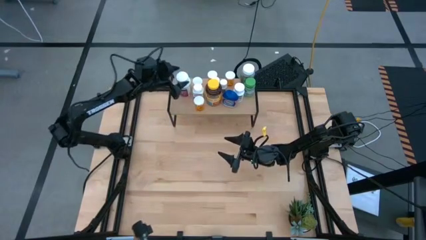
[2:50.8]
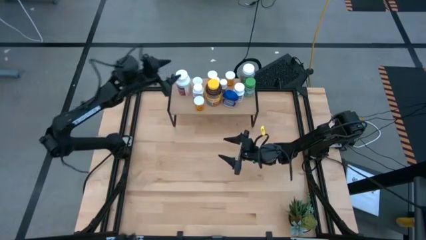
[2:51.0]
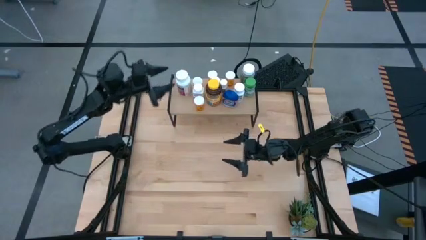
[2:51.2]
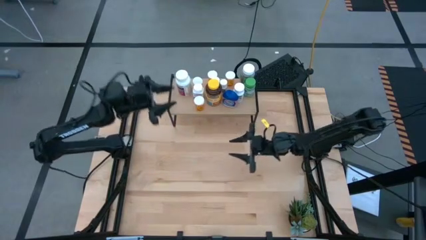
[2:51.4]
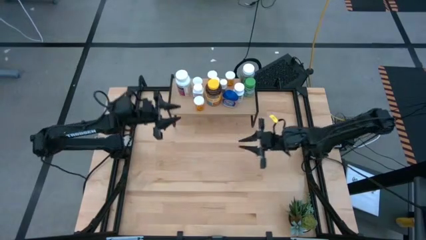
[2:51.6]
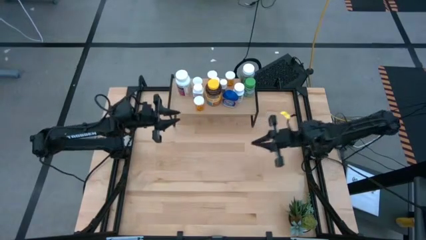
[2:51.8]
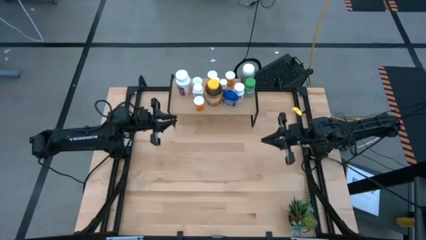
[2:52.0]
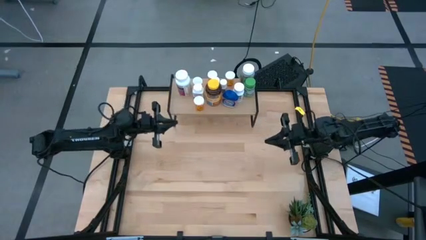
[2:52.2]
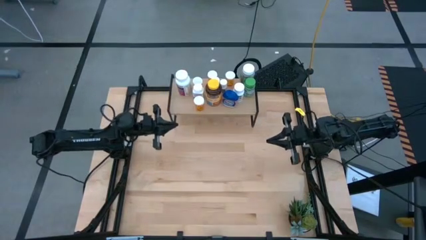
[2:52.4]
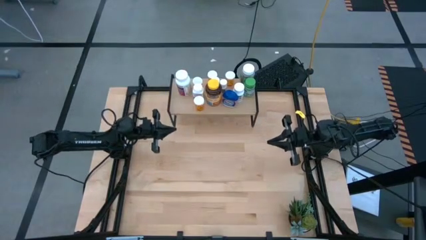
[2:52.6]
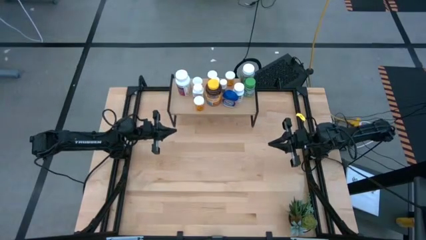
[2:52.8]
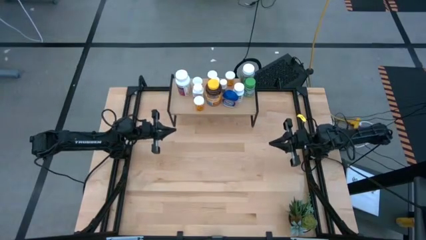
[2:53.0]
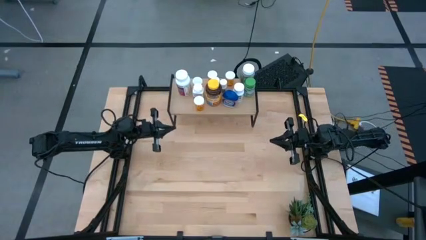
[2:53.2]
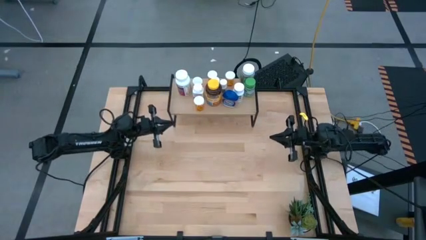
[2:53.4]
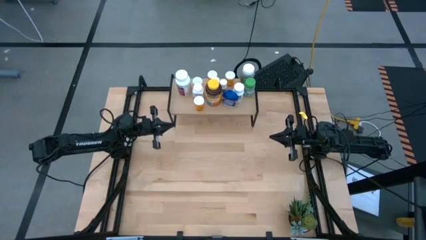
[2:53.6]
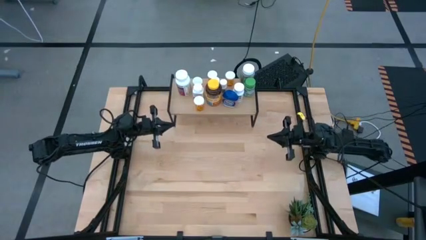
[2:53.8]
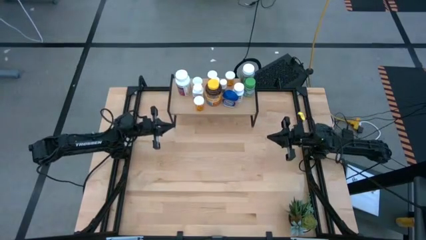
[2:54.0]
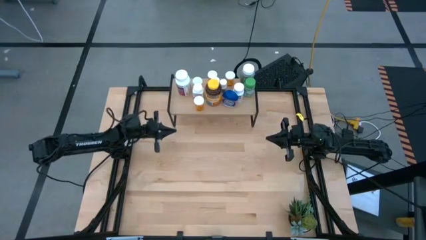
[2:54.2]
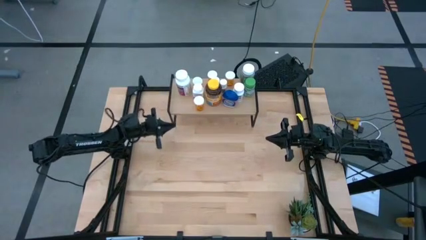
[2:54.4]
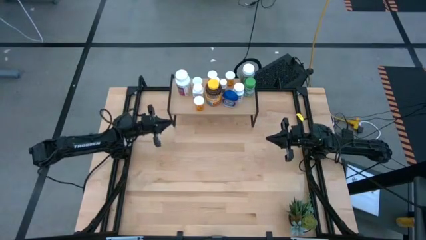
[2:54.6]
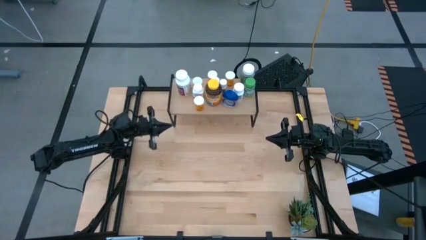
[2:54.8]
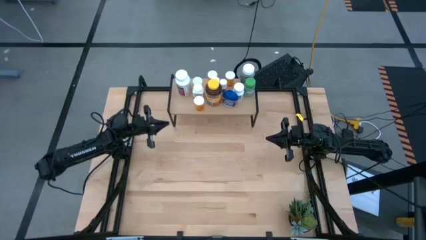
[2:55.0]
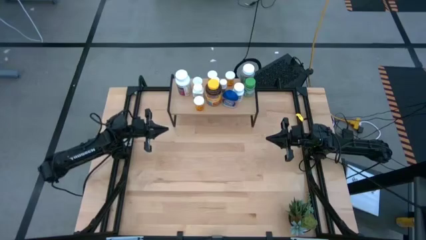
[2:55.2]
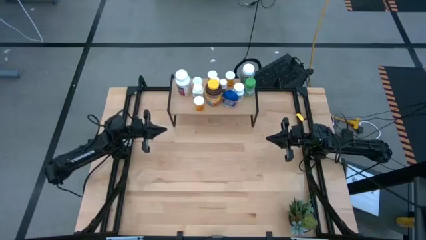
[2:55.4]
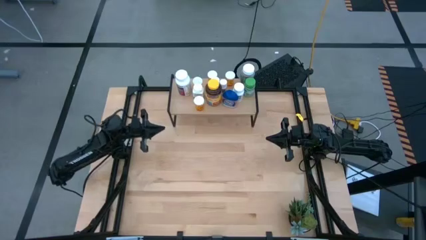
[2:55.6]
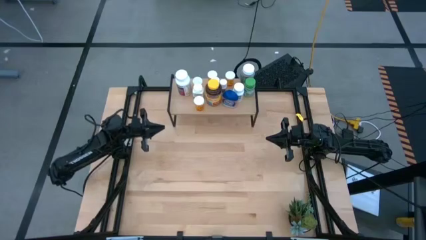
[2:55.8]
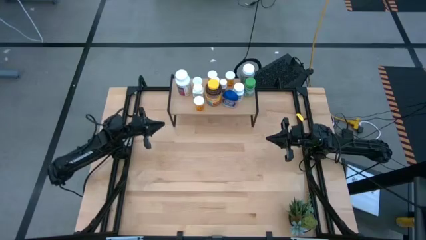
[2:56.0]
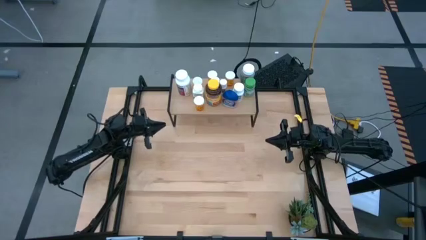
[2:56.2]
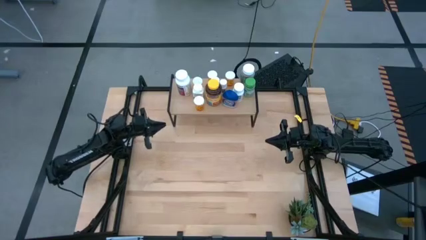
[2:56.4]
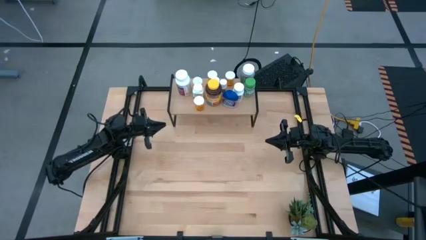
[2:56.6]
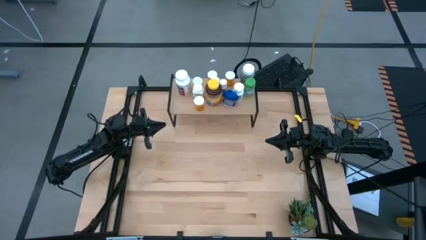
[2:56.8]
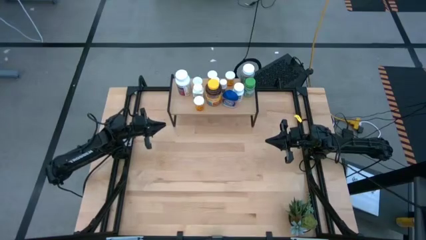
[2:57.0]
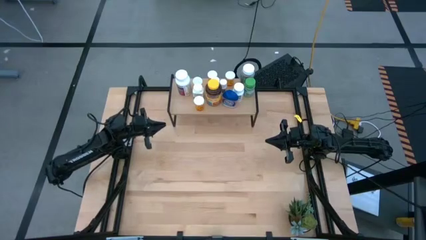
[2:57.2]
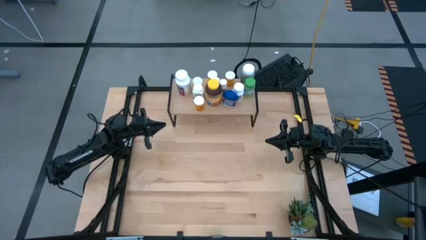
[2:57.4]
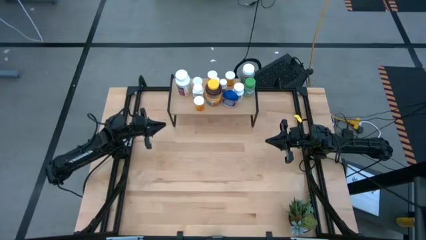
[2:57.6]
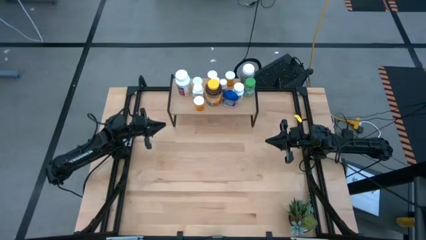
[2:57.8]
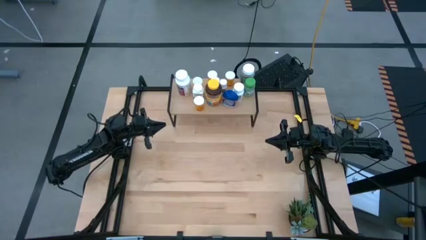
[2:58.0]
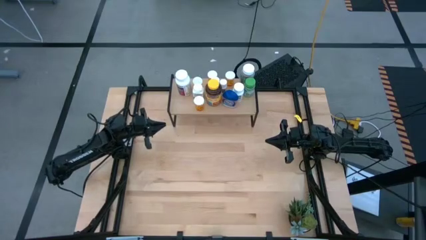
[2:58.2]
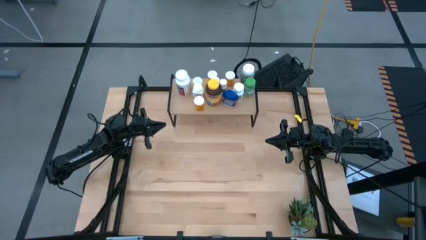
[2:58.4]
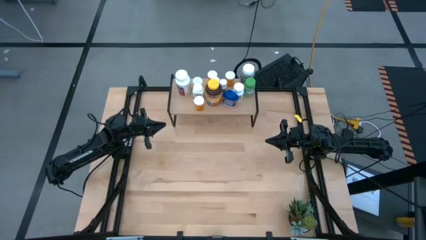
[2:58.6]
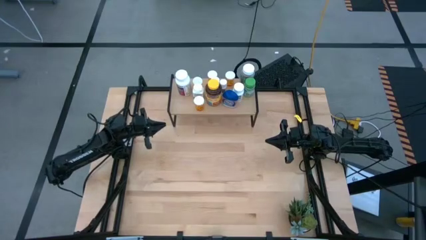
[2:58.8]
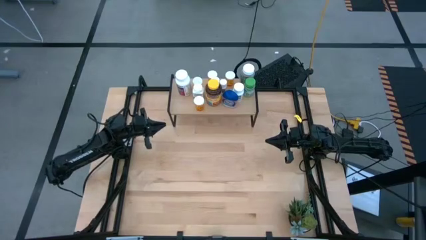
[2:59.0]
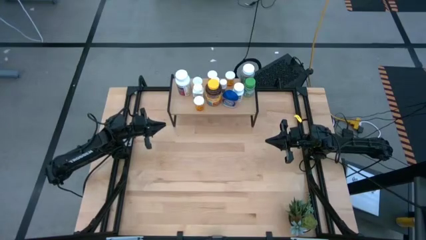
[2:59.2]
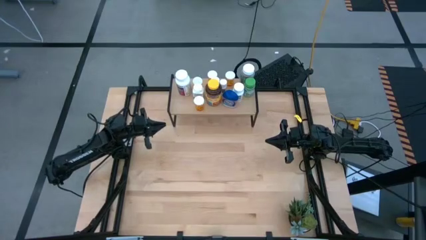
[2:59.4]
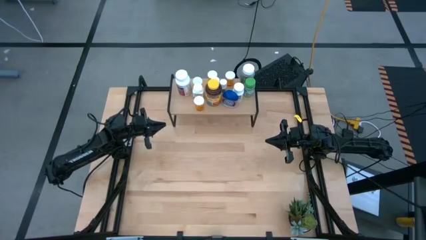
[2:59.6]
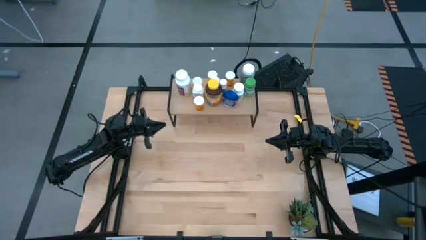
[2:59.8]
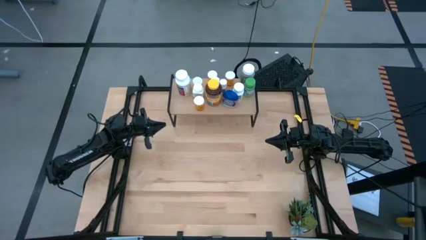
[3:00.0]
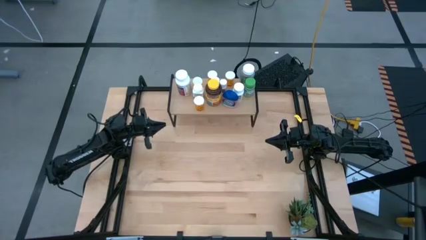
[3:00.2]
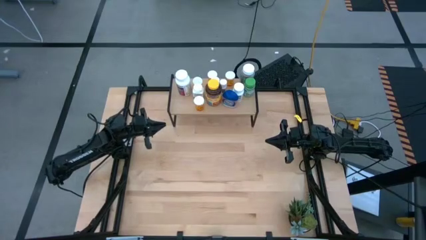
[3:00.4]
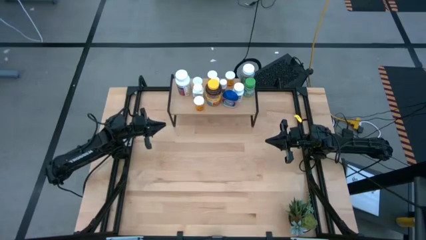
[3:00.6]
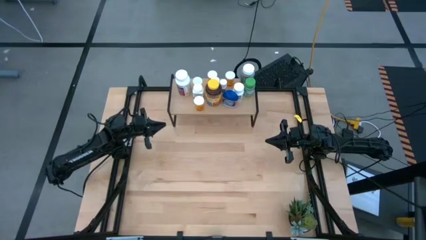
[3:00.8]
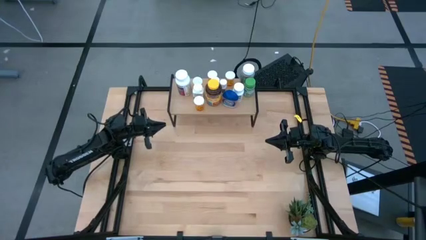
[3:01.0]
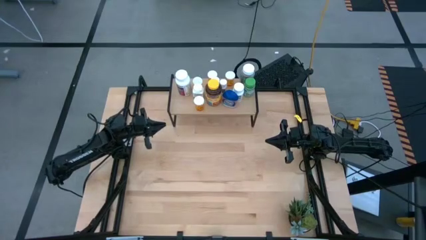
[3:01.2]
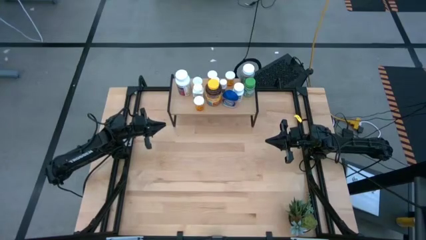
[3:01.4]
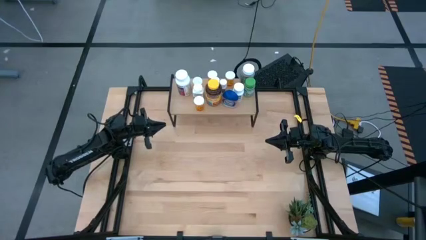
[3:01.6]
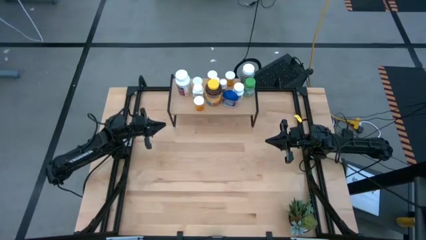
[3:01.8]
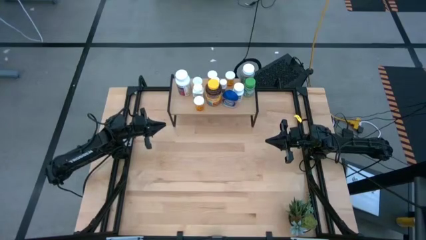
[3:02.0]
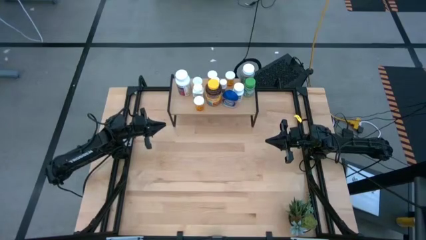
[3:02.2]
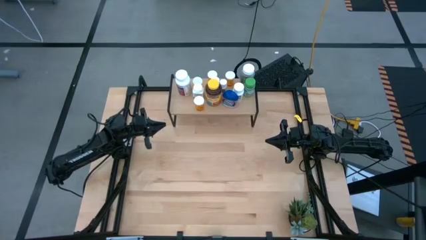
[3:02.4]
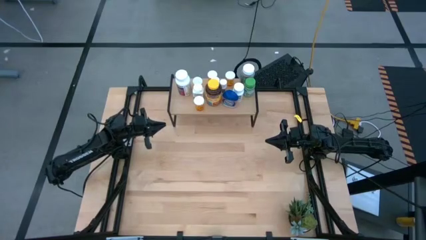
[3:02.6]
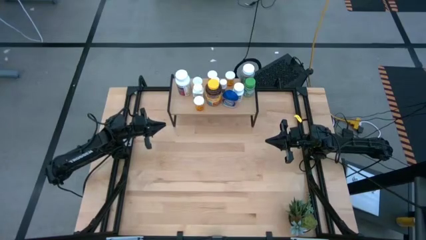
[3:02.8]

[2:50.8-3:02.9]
Task: Pick and place medicine bottles onto shelf by color
Return to Home Position
